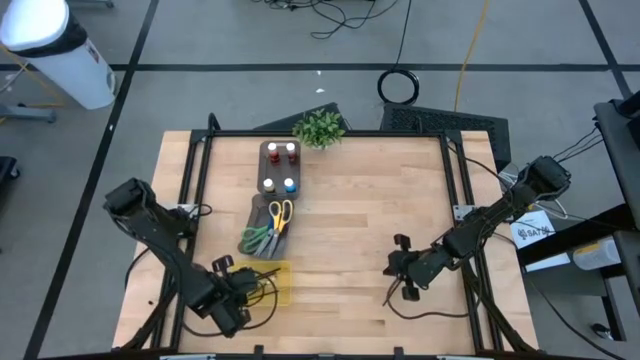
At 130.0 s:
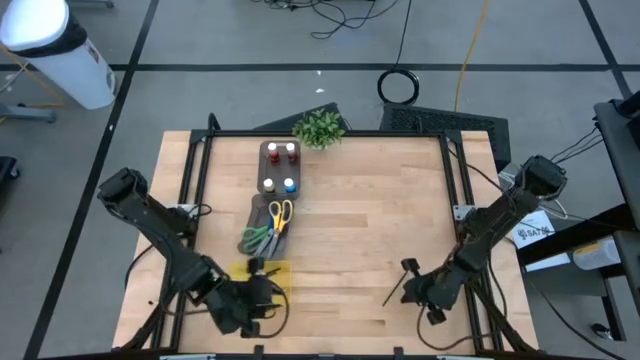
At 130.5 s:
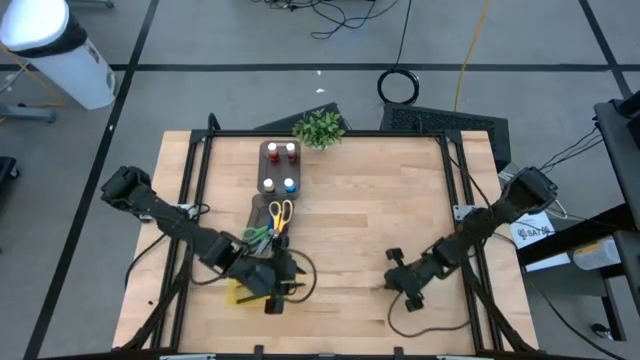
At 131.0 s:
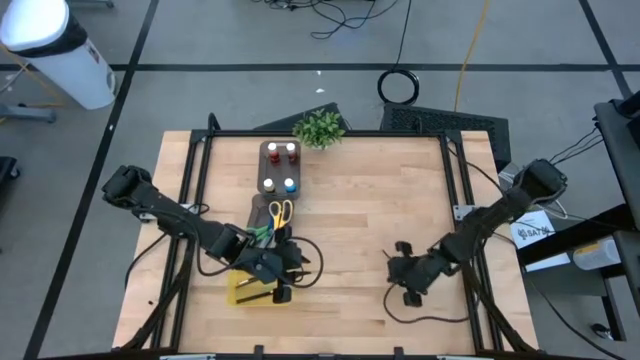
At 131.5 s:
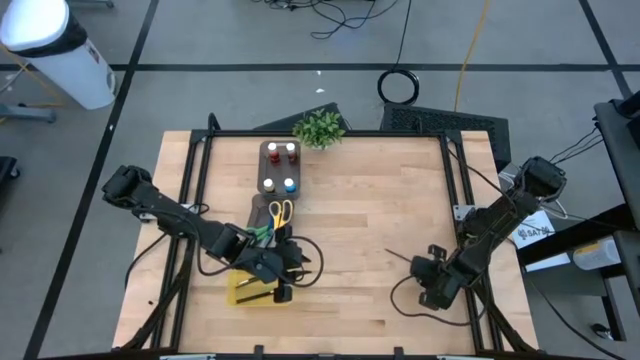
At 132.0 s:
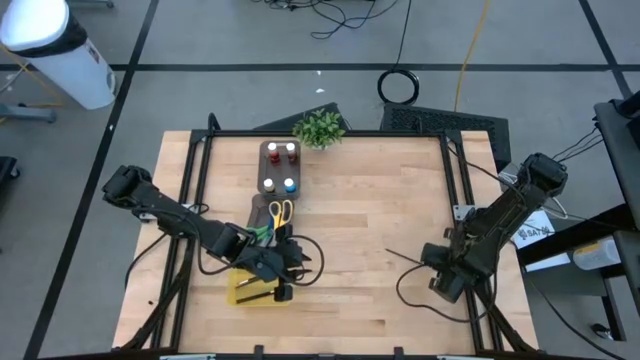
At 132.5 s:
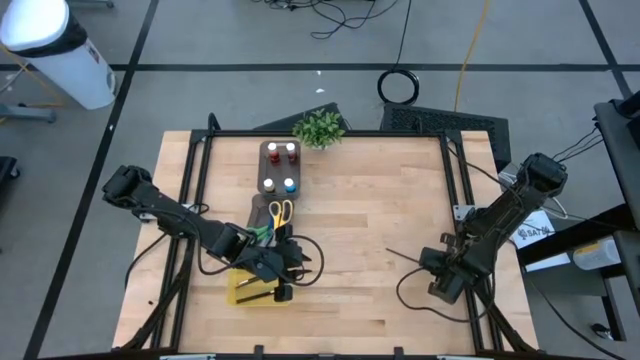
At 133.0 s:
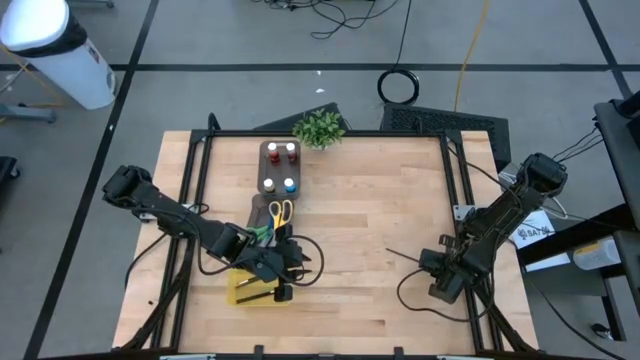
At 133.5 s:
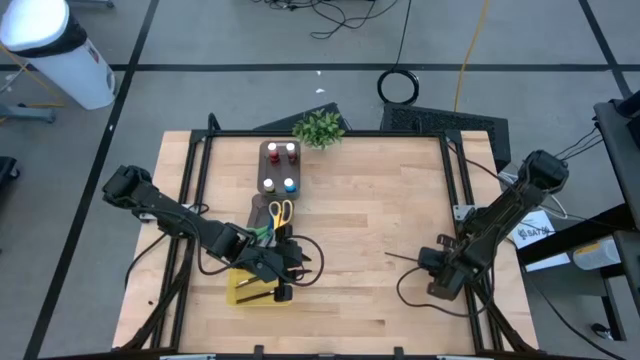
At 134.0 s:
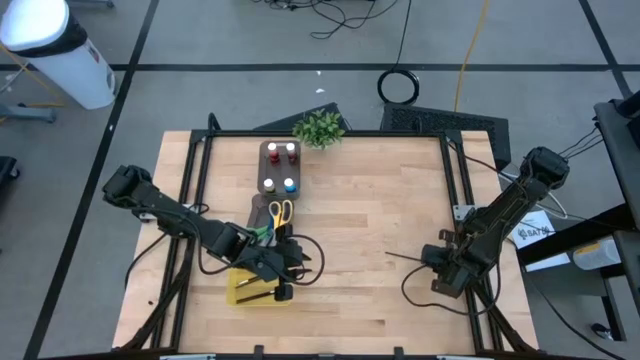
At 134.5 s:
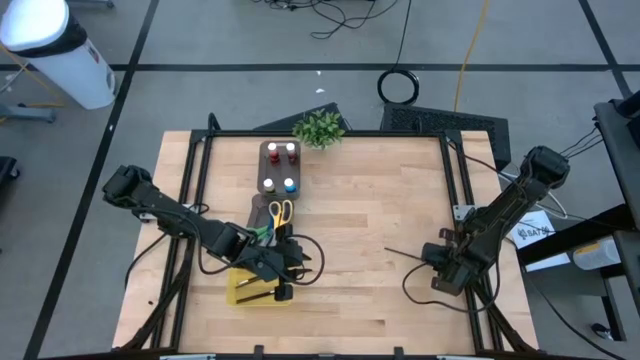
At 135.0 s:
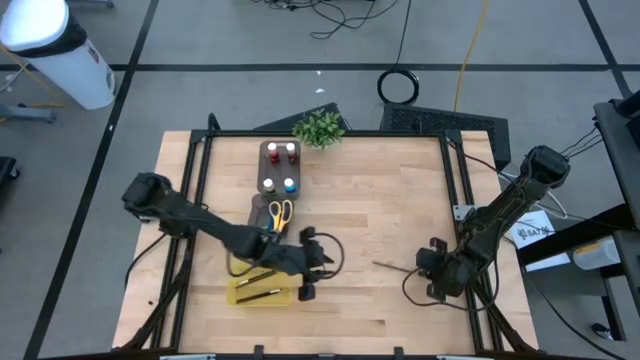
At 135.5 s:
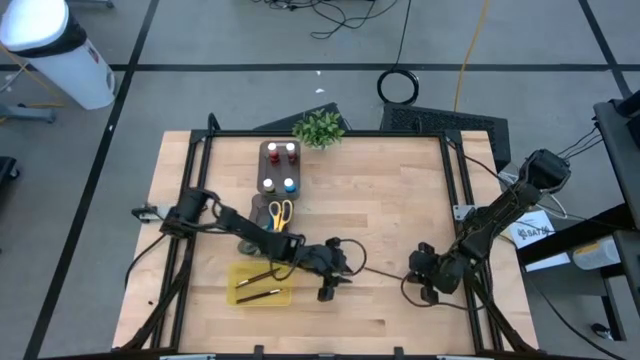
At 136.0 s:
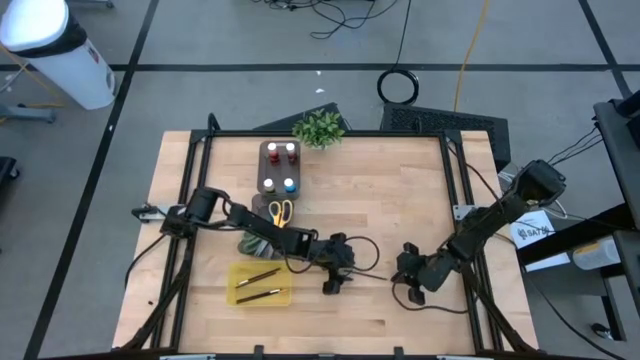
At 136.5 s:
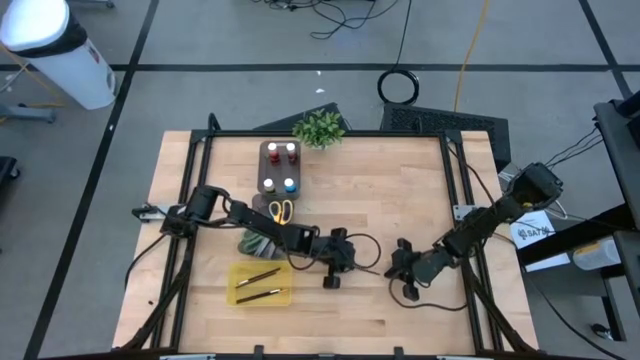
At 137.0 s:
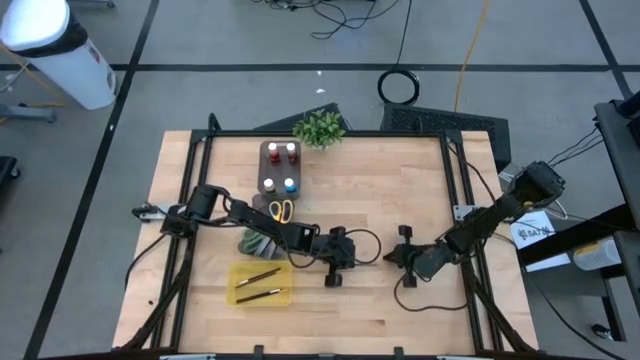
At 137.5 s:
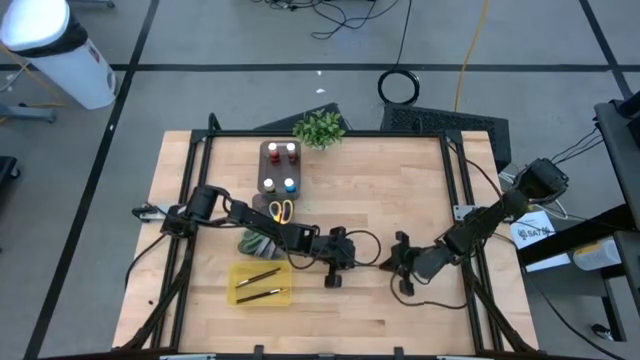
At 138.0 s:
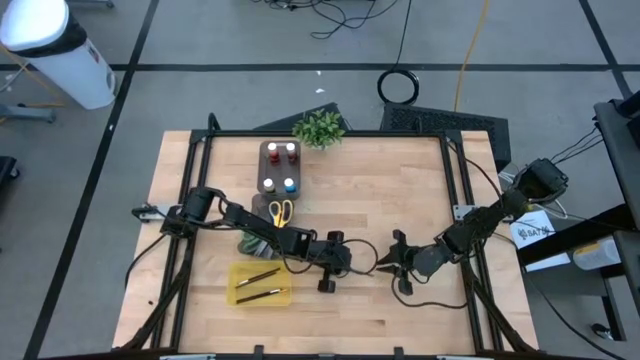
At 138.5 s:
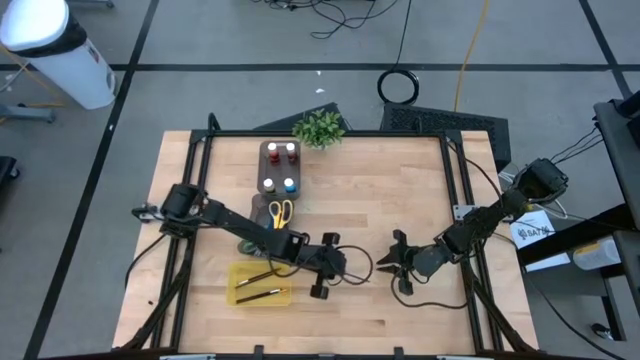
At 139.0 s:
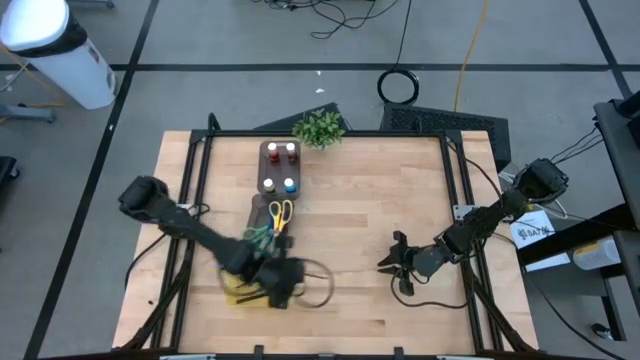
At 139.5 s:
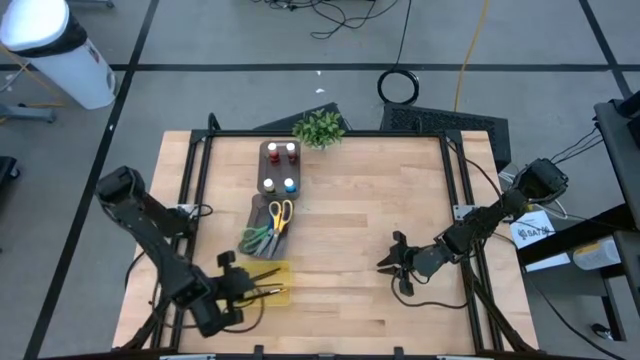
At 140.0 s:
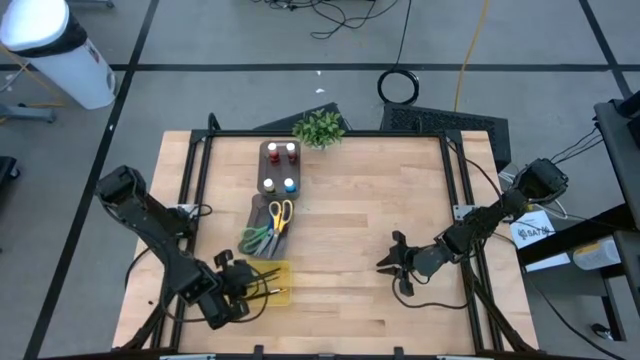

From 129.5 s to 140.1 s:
Task: Pick & Place Paint Supplies
Put the gold black paint brush into the yellow bin

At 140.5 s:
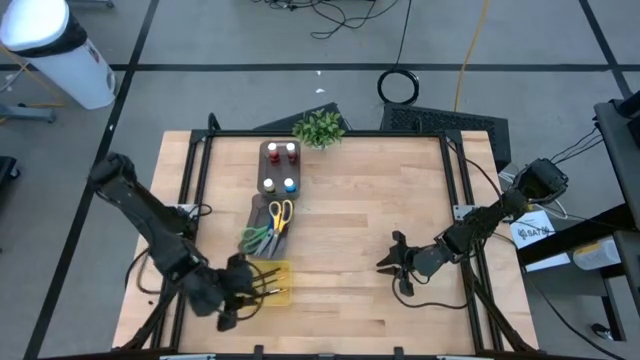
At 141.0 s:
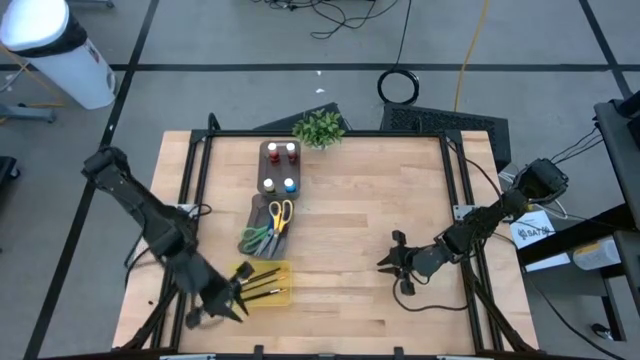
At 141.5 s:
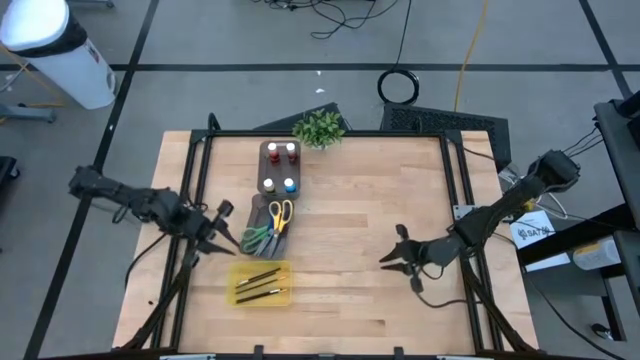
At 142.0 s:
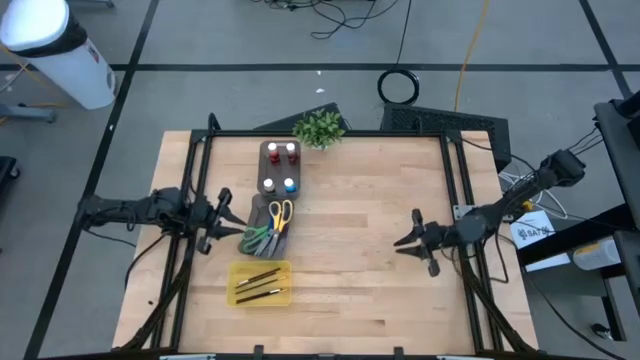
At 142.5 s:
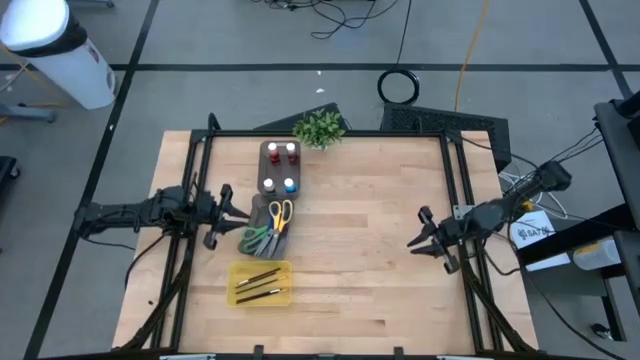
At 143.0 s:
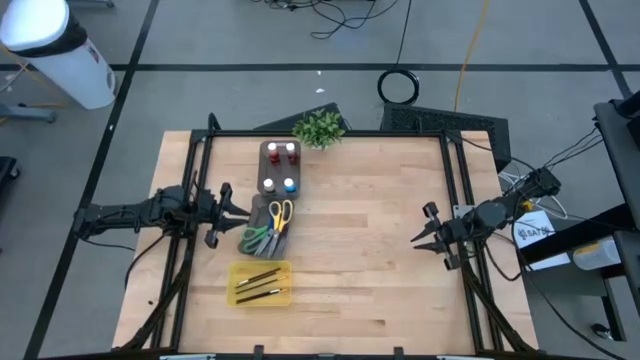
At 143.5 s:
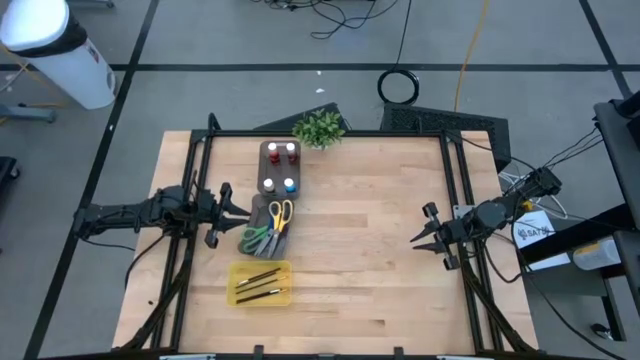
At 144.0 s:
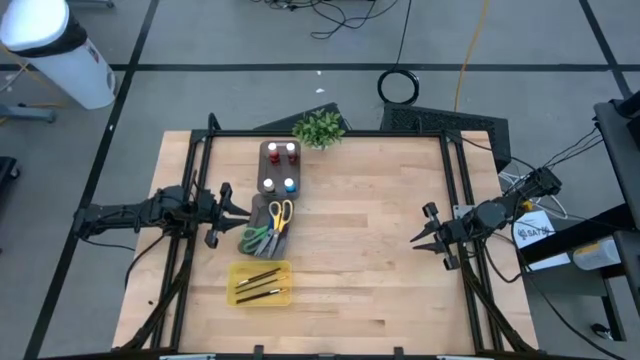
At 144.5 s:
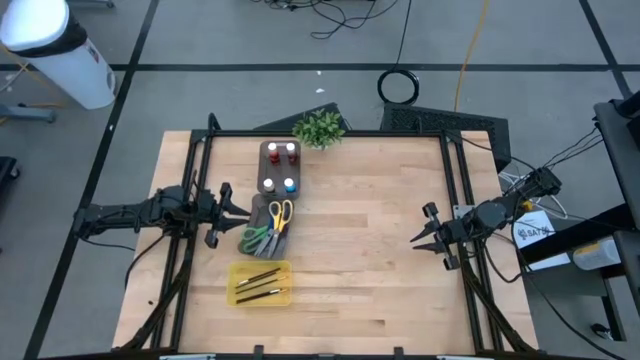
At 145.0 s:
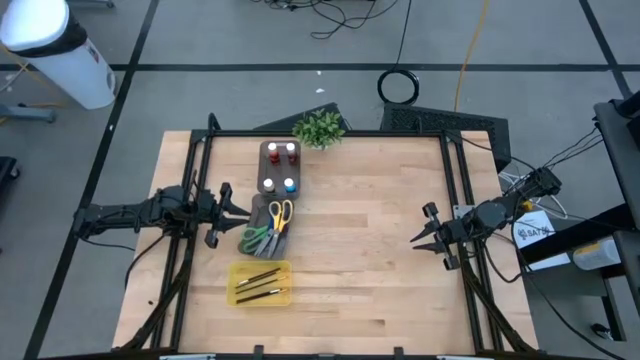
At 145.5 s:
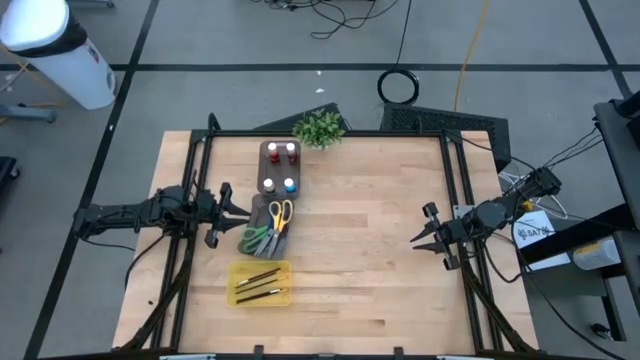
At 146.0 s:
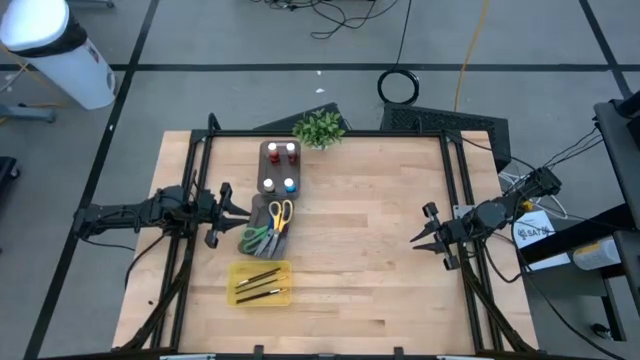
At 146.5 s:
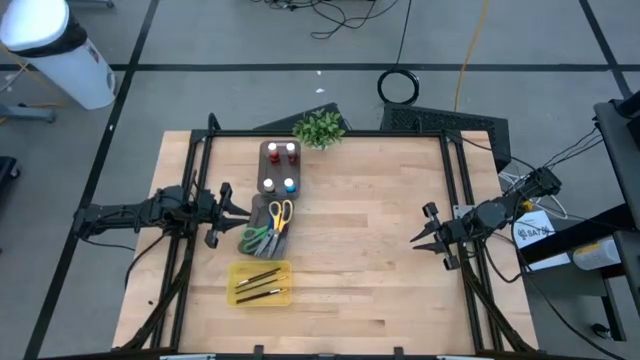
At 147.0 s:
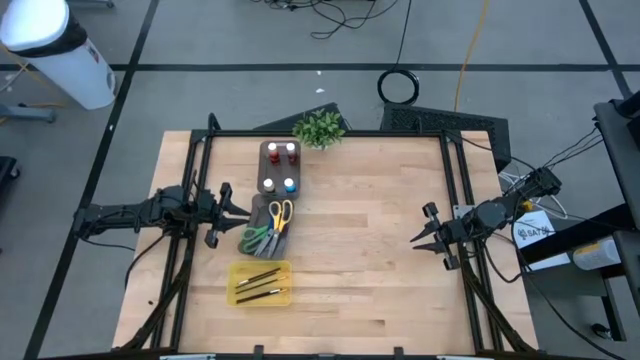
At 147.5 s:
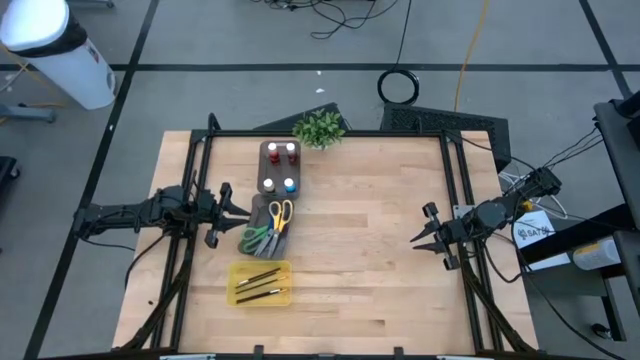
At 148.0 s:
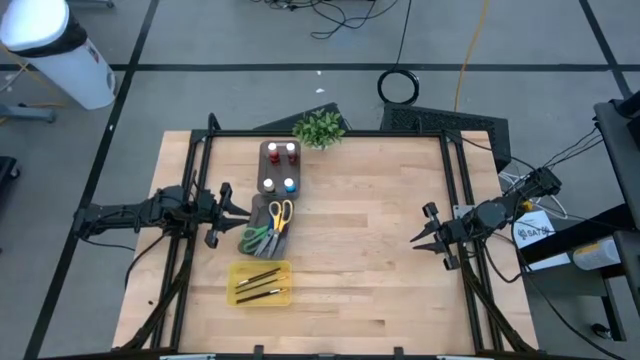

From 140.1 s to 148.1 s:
Return to Home Position

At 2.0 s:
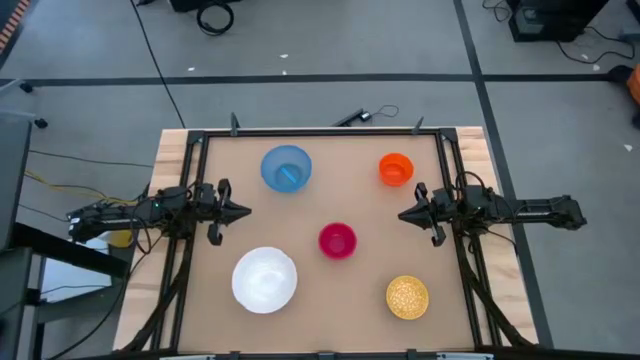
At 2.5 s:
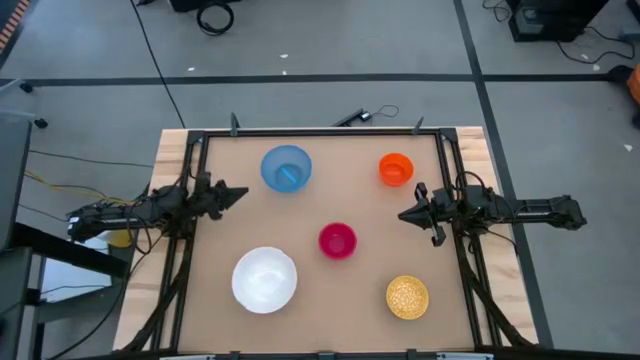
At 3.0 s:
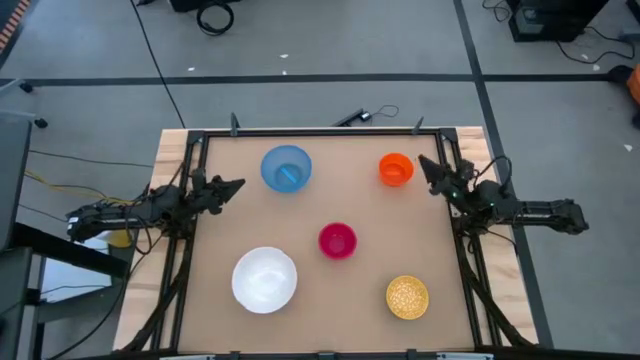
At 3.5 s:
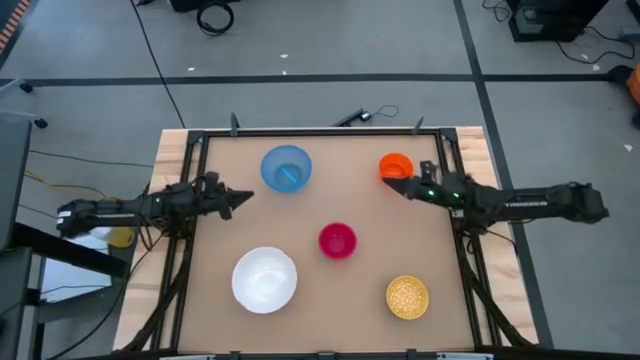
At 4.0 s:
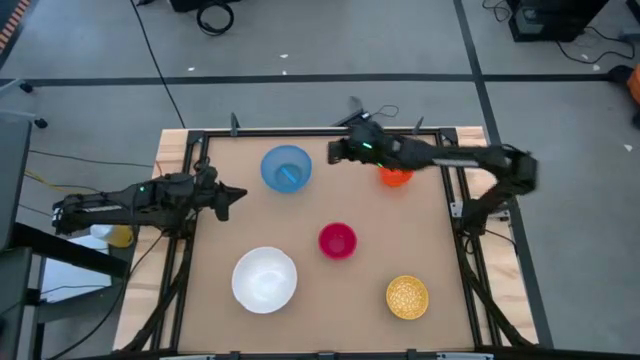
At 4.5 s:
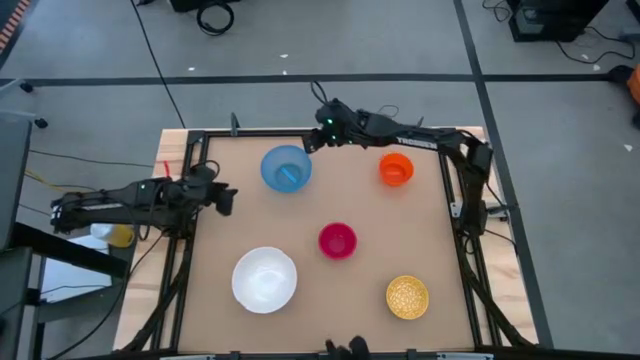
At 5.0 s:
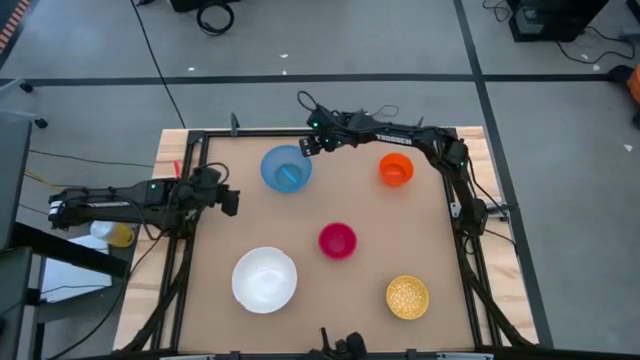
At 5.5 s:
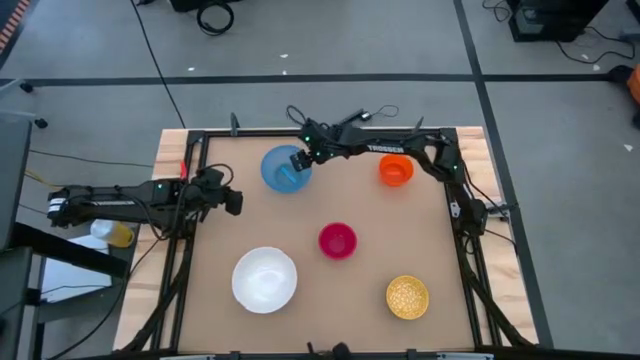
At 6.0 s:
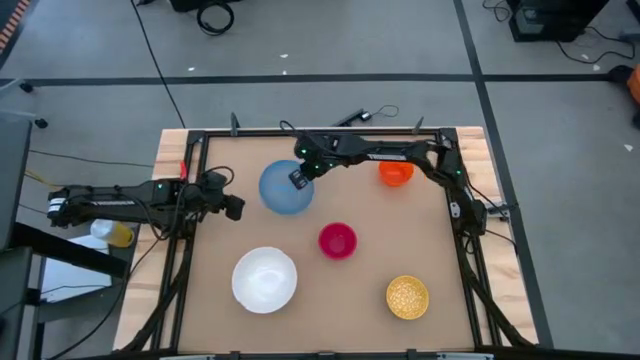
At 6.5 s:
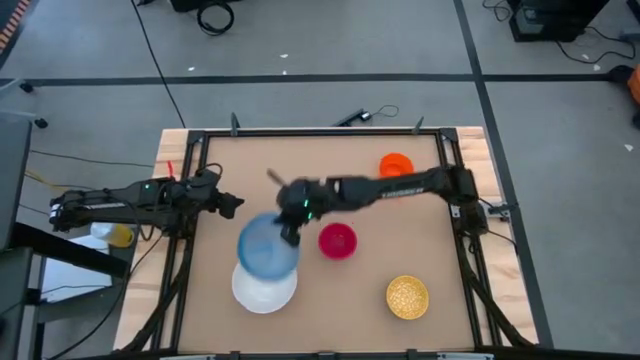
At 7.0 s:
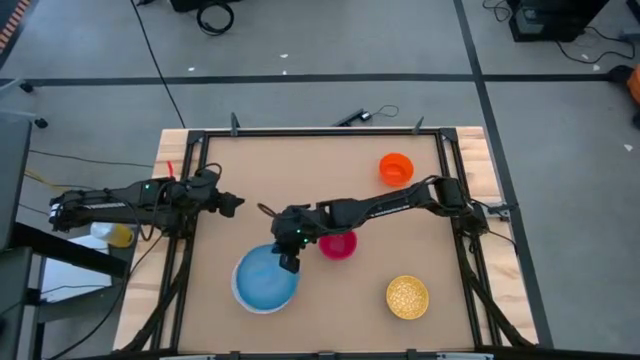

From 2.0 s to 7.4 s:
Task: Nest bowls inside each other by size order
Stack the blue bowl on top of the white bowl
